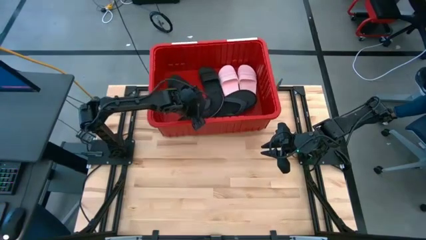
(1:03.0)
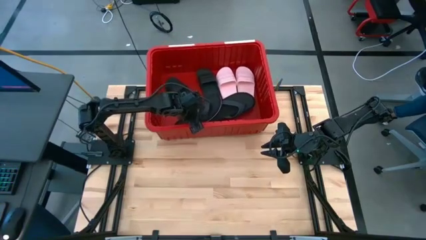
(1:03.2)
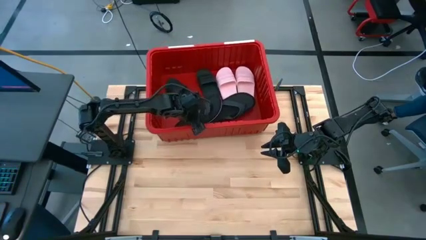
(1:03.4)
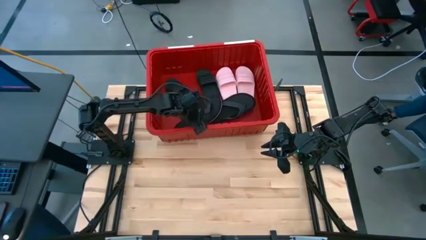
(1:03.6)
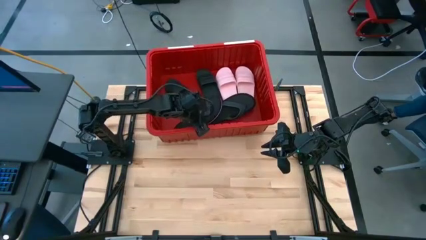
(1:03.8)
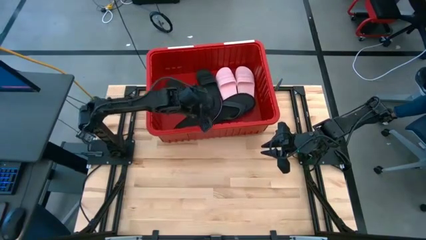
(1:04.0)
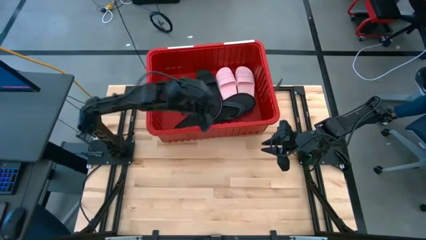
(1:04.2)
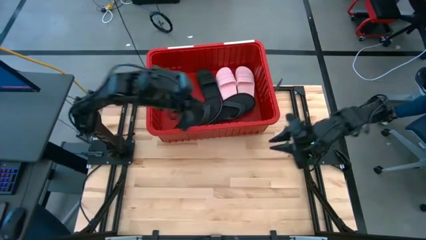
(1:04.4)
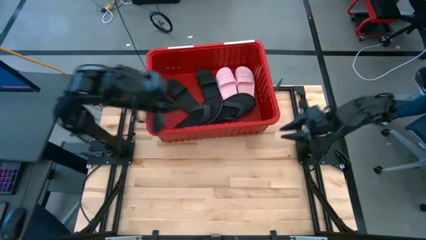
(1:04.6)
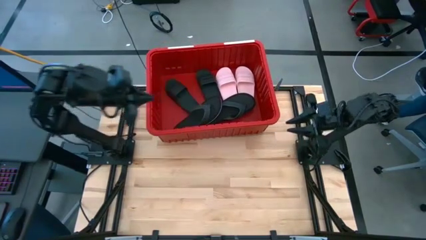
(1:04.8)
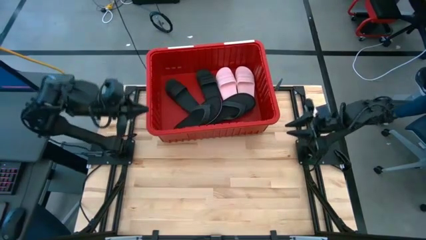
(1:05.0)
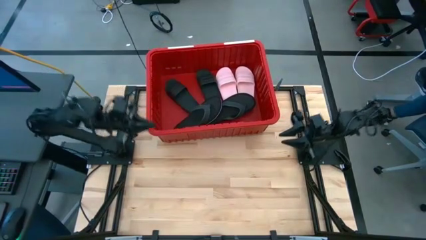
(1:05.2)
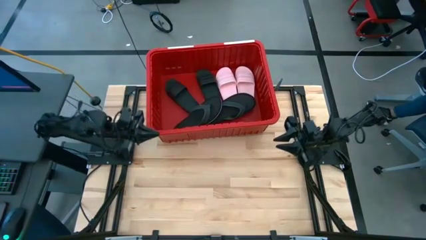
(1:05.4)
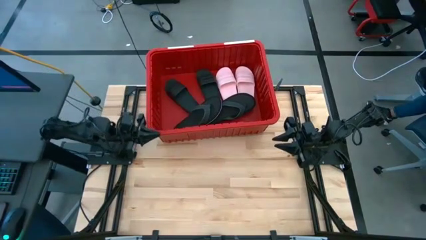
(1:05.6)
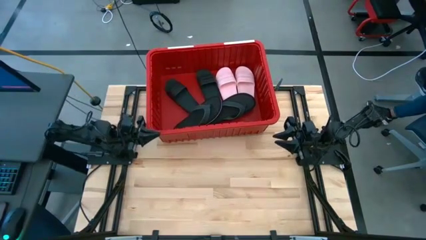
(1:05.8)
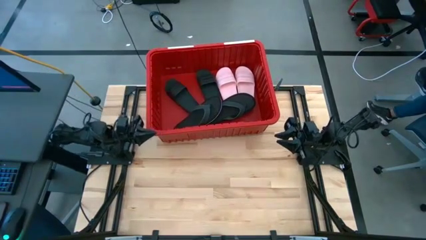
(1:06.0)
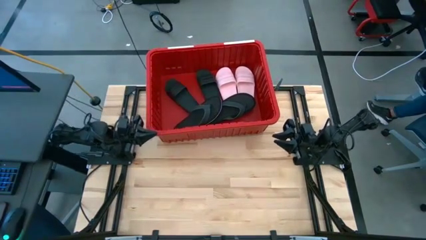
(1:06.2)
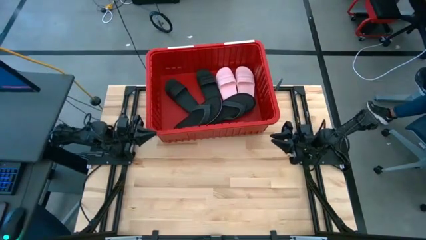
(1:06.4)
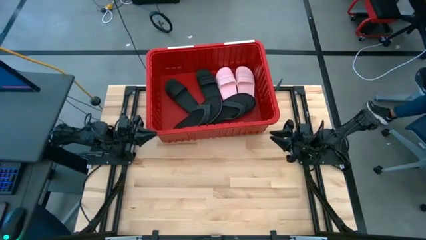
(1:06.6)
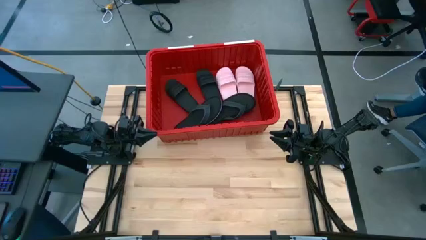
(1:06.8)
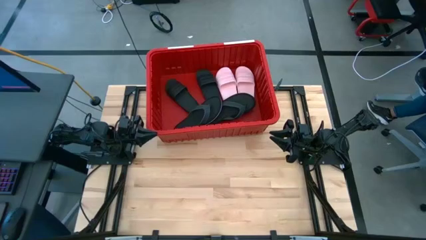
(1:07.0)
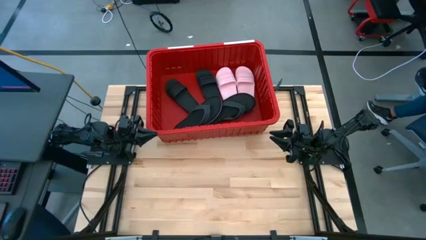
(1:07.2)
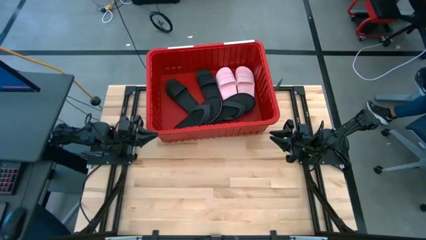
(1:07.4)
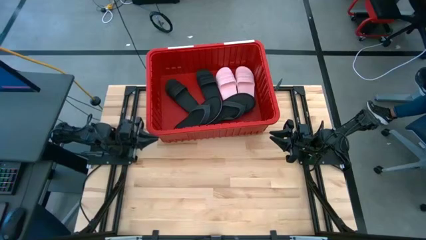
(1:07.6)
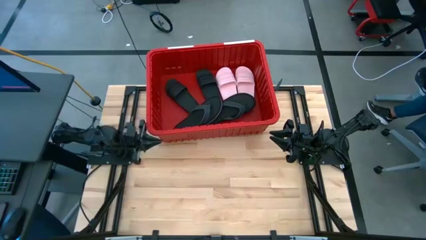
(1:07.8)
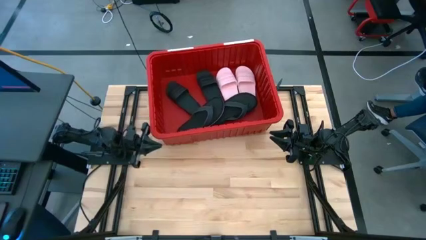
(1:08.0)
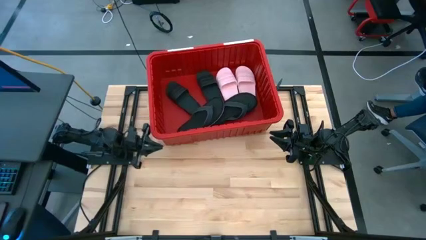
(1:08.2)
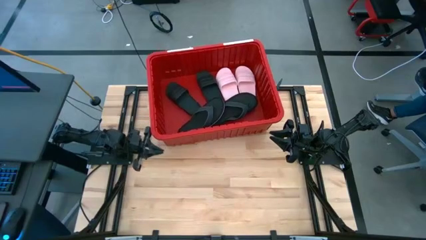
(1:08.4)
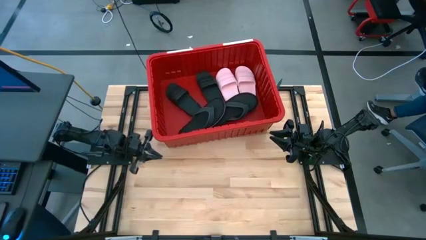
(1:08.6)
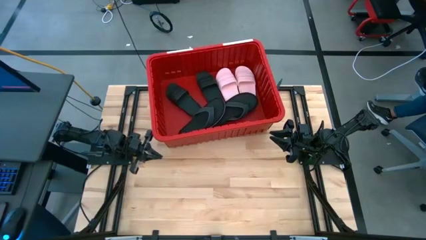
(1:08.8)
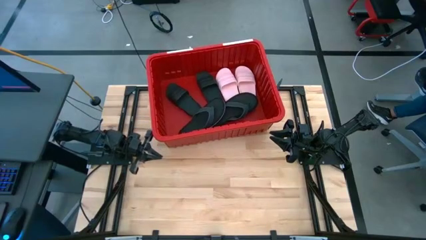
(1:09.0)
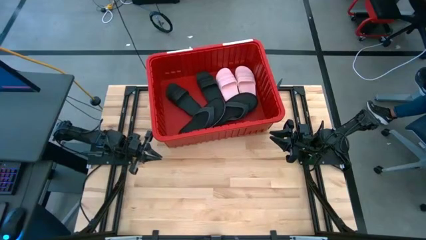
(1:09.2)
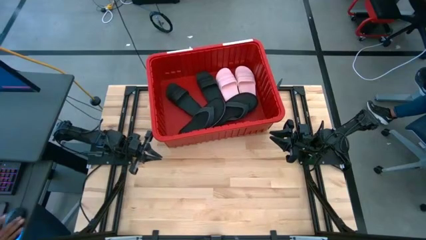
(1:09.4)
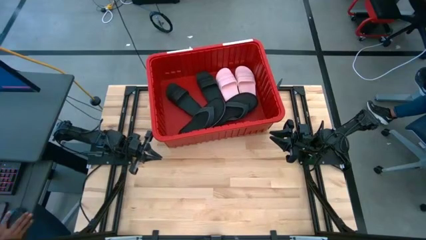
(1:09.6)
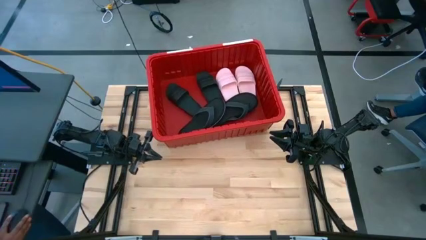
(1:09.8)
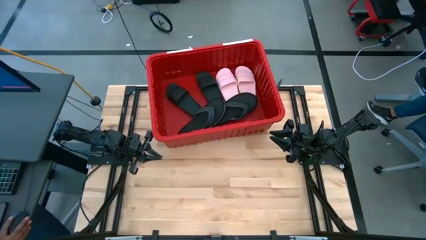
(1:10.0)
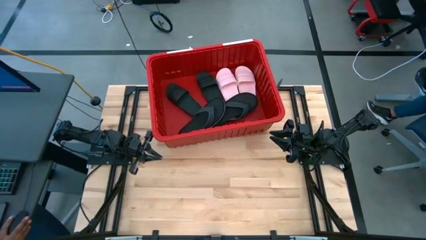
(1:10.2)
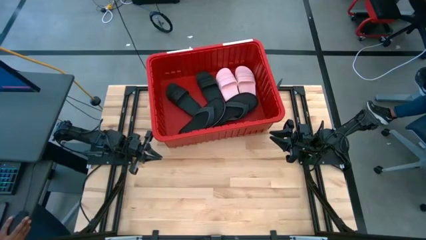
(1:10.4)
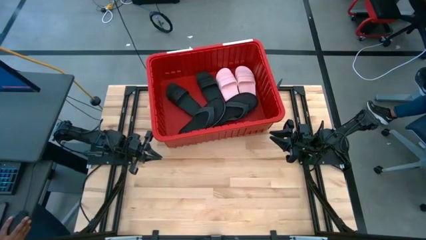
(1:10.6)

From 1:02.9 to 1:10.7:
Task: Pick and place slides into bin
Return to Home Position

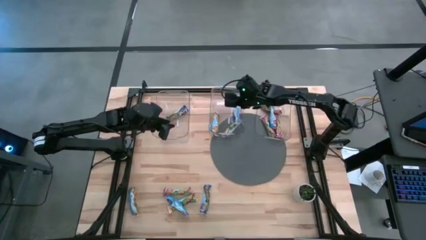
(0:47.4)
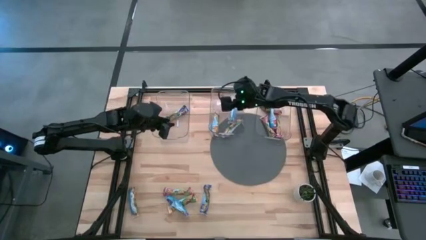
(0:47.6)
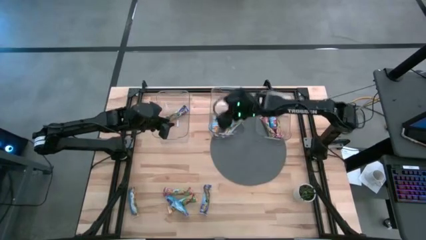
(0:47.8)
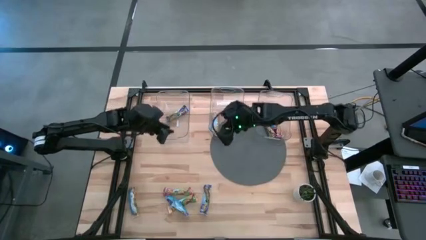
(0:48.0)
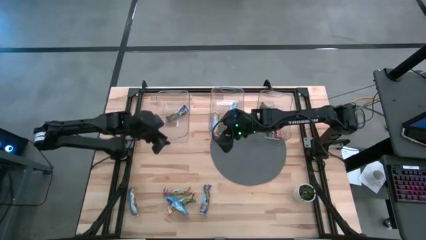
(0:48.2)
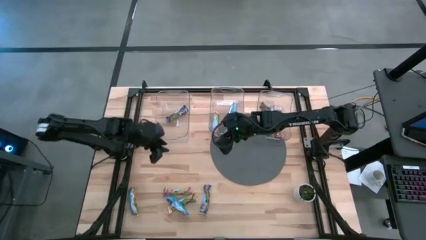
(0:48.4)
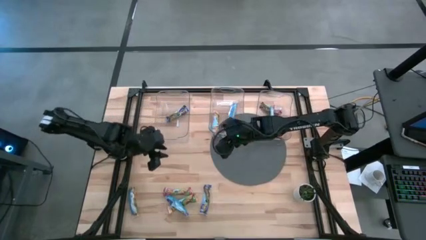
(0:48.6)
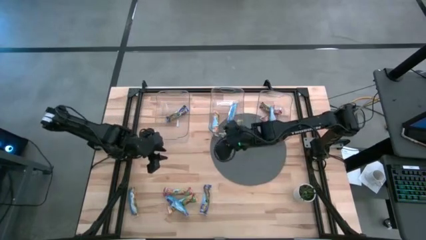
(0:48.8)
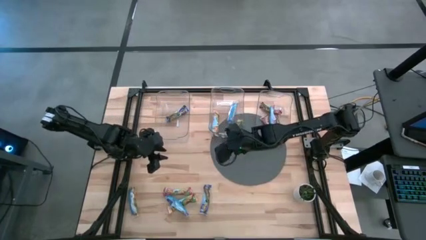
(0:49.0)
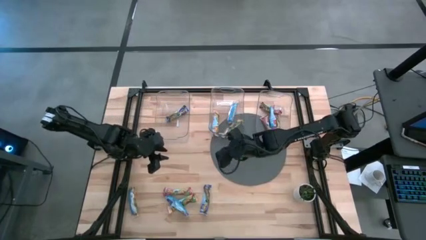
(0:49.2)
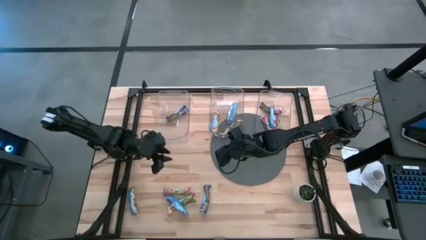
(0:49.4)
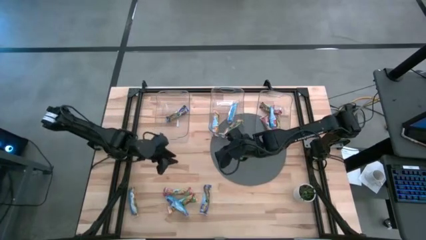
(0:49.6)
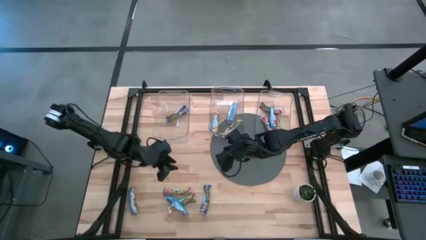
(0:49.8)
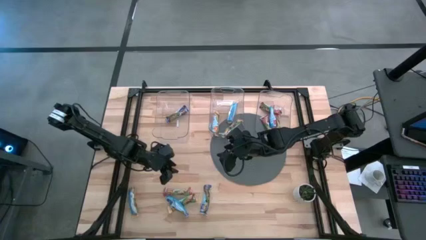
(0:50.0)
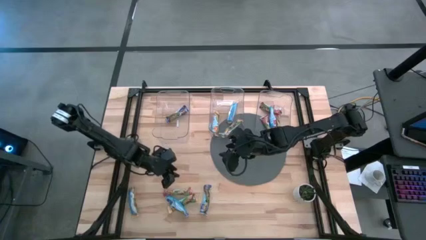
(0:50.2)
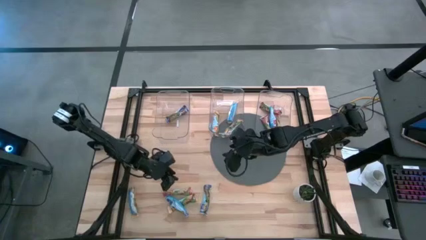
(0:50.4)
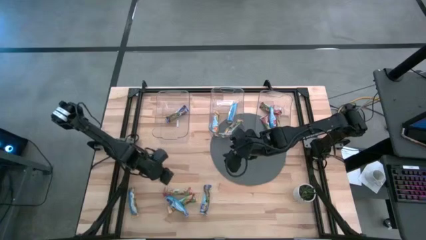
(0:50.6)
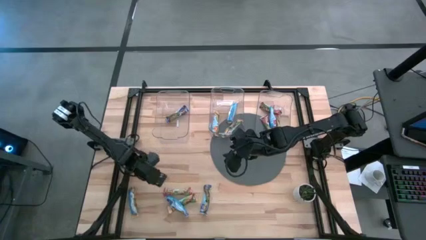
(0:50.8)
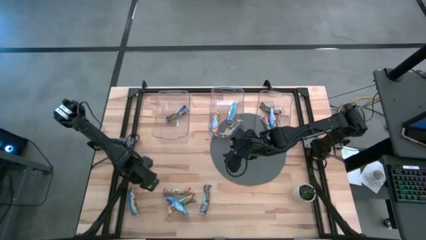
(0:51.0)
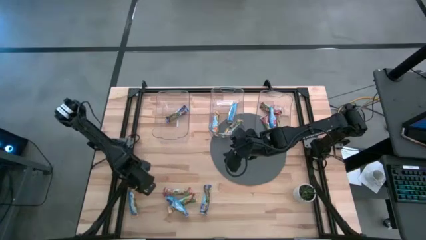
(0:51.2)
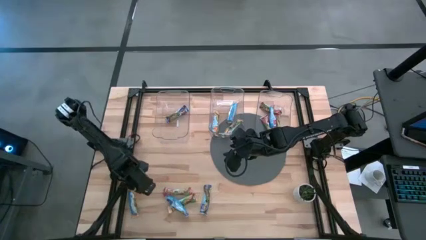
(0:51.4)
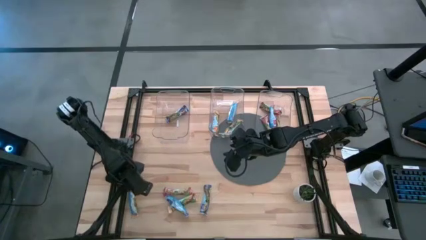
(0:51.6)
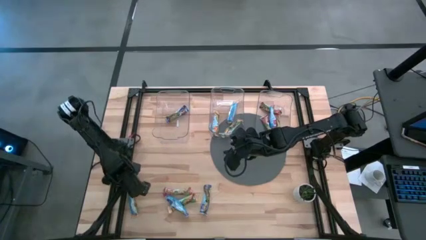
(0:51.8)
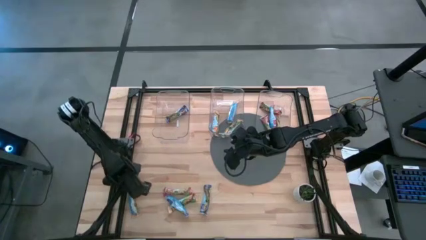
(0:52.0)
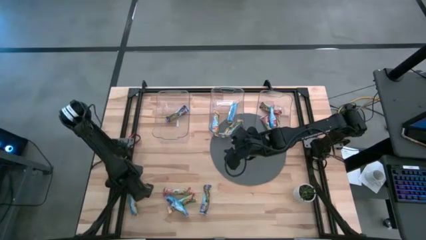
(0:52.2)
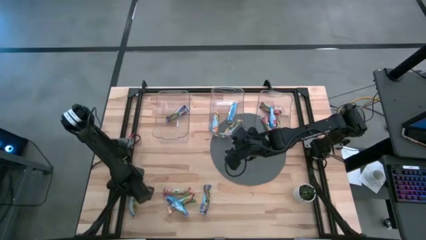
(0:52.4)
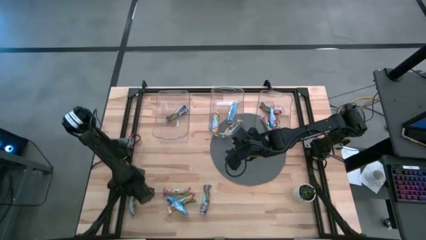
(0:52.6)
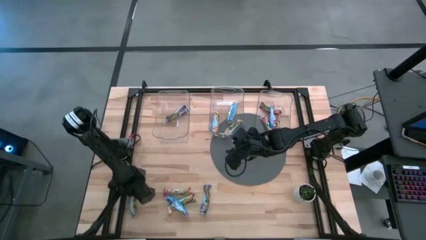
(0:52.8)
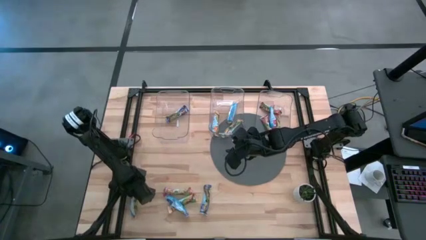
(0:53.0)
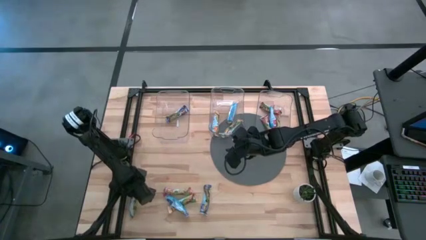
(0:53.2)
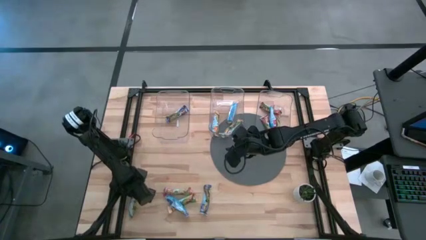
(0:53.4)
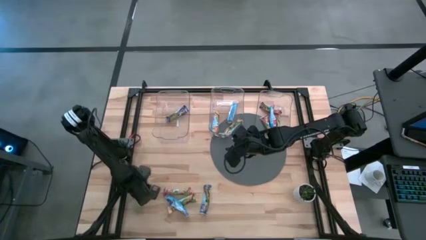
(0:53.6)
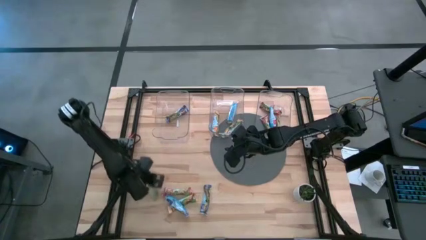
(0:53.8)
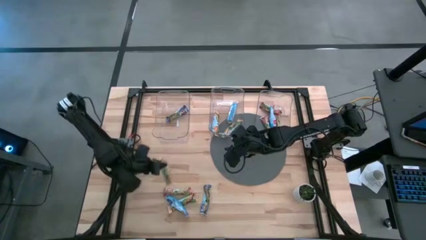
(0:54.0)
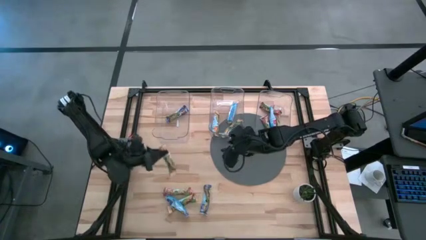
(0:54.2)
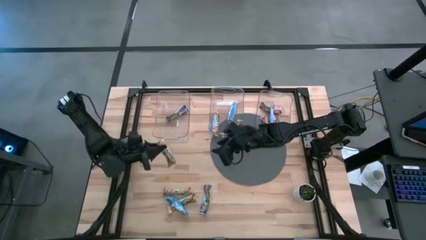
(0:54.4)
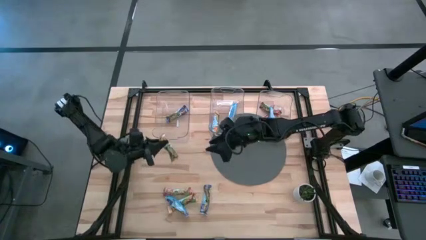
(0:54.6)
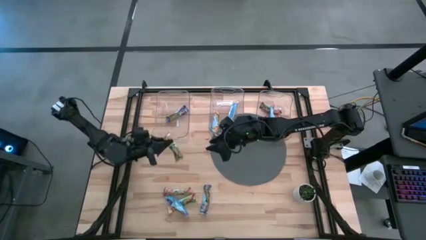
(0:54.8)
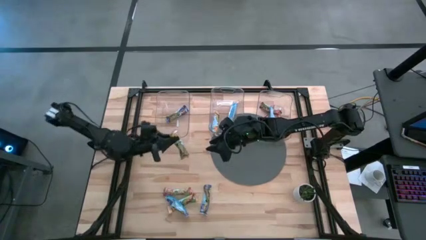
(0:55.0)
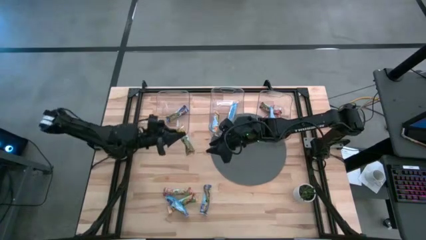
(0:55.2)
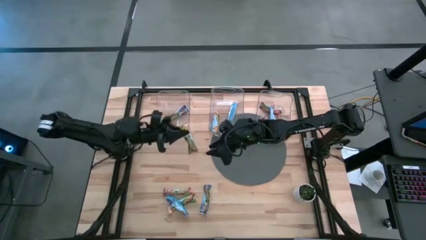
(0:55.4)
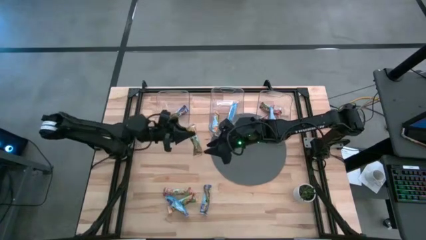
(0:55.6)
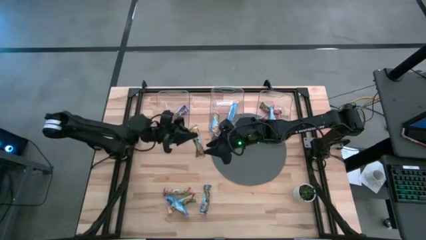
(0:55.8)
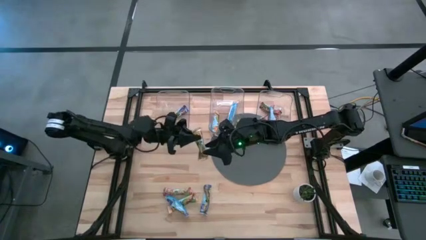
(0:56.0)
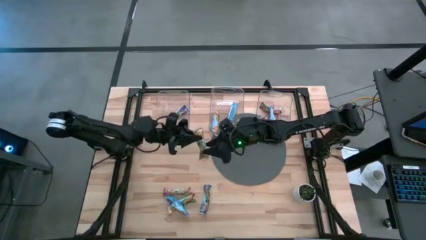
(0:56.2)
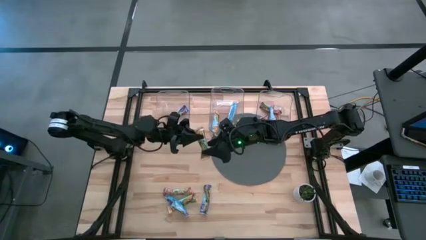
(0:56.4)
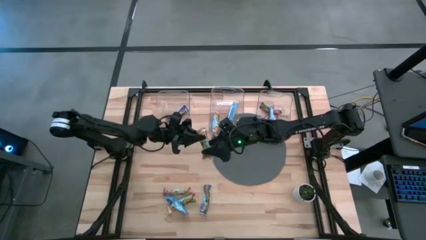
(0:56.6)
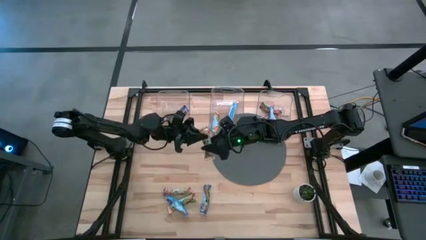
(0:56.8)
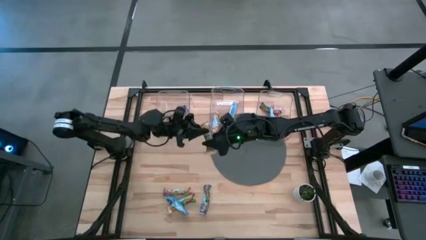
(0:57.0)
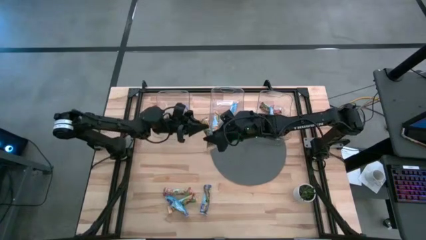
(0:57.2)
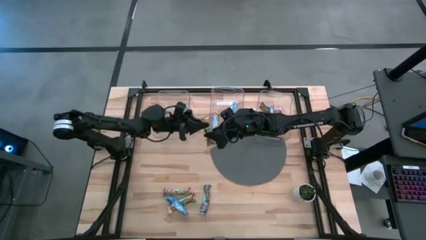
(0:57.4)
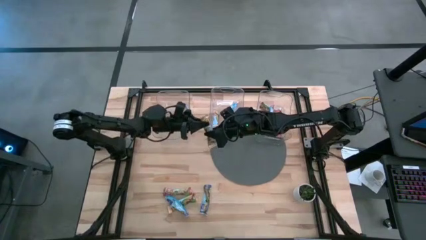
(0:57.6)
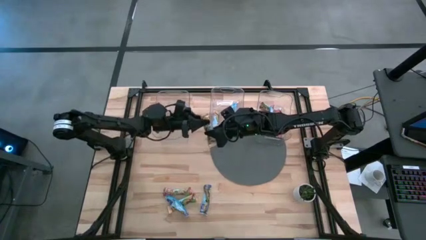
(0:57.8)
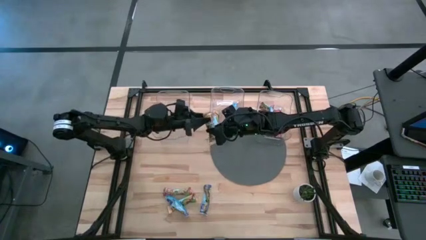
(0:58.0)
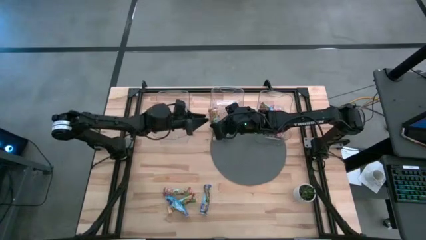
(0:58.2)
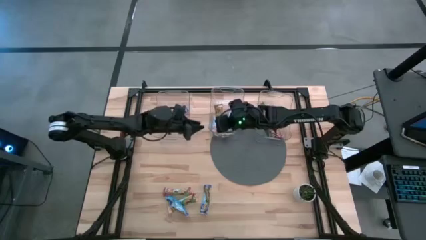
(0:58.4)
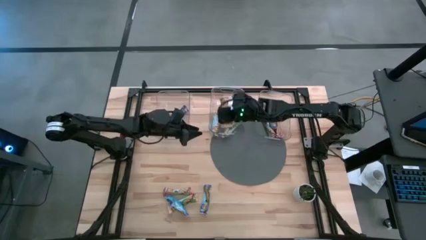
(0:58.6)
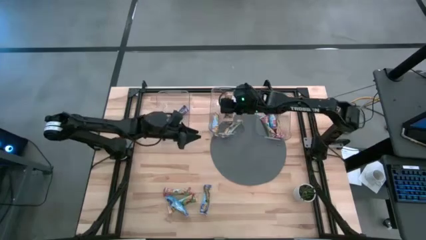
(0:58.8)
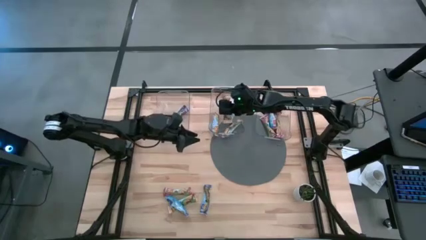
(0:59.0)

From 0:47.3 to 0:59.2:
Task: Pick and place Granola Bars by type
Put the yellow granola bar into the middle transparent bin
